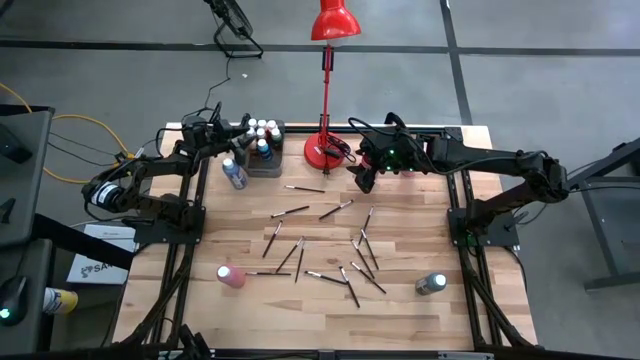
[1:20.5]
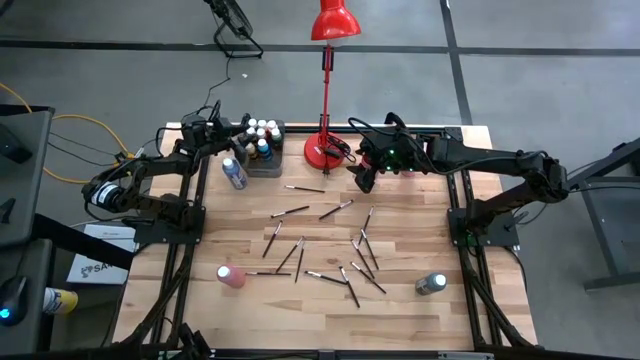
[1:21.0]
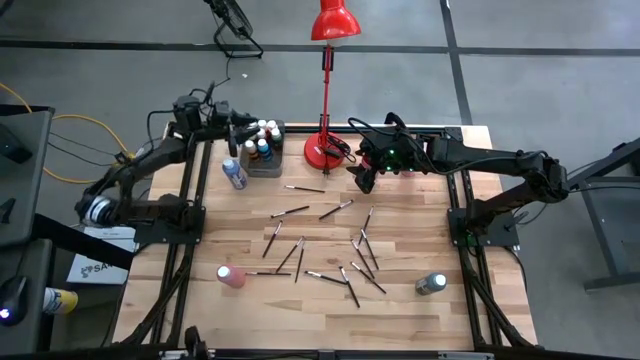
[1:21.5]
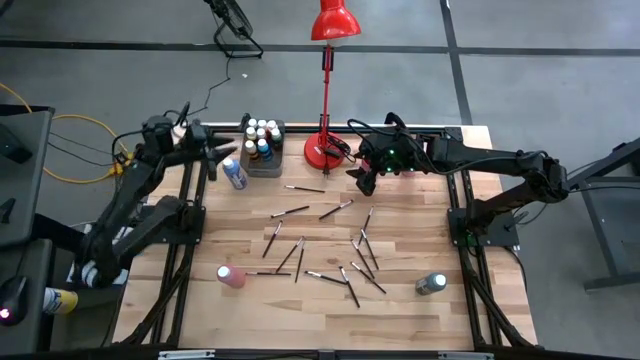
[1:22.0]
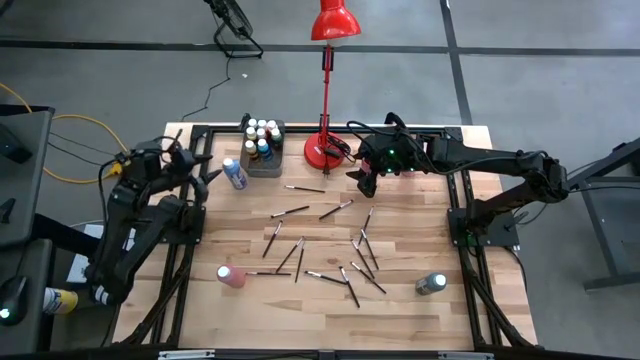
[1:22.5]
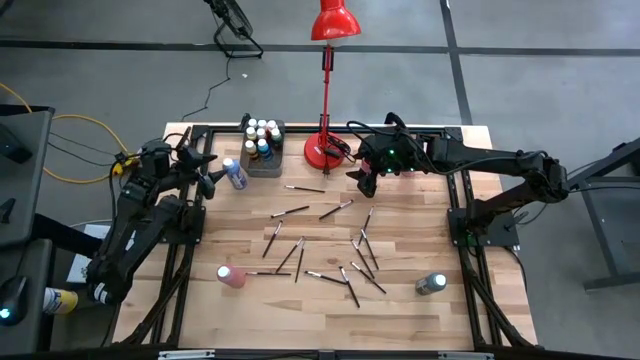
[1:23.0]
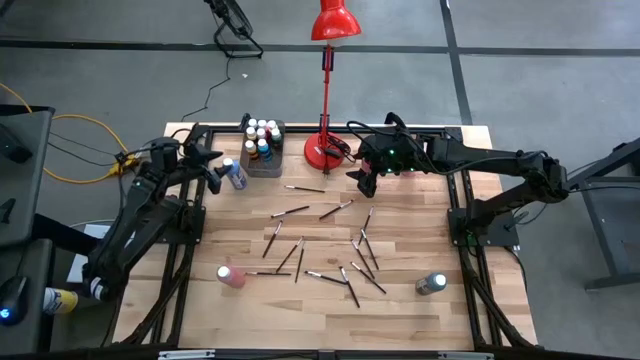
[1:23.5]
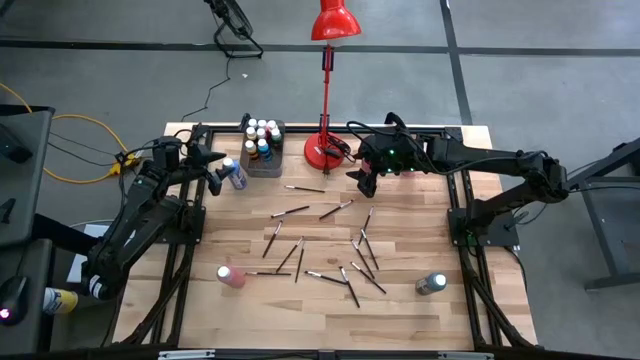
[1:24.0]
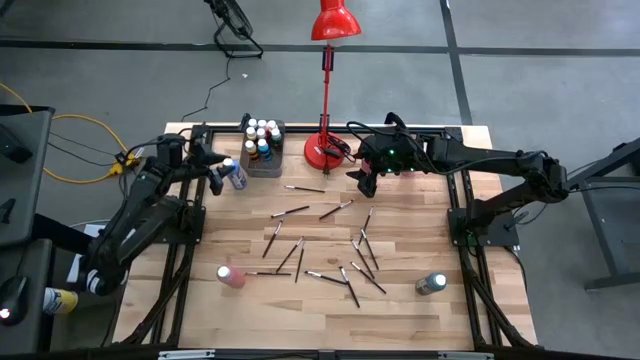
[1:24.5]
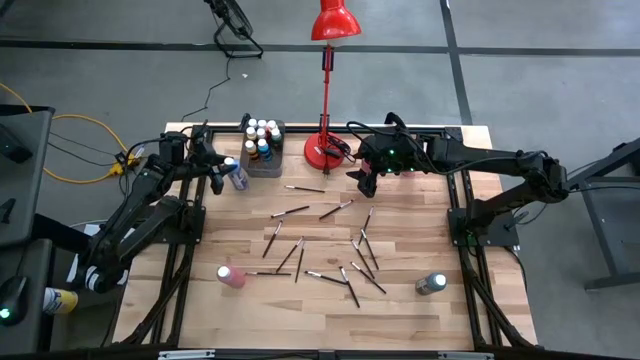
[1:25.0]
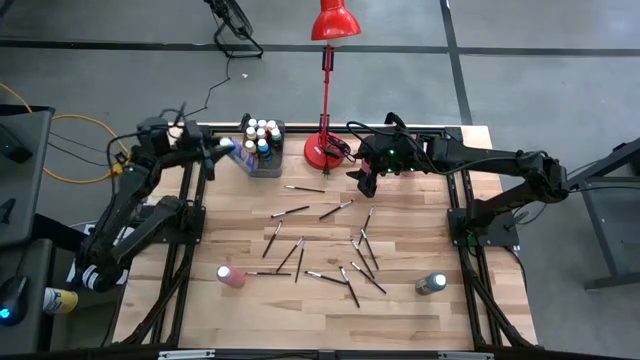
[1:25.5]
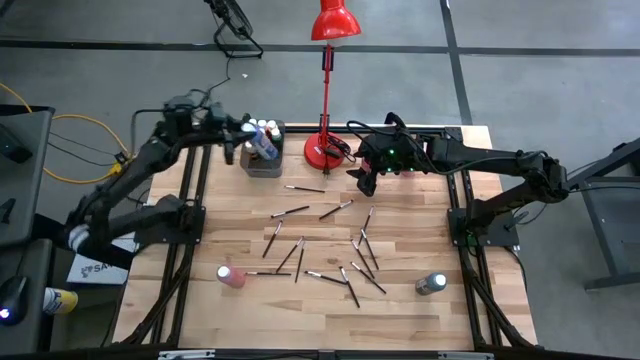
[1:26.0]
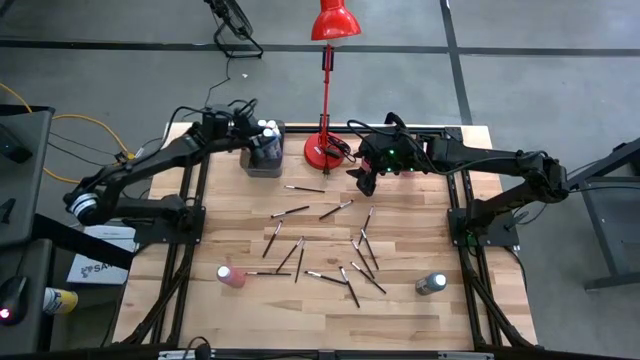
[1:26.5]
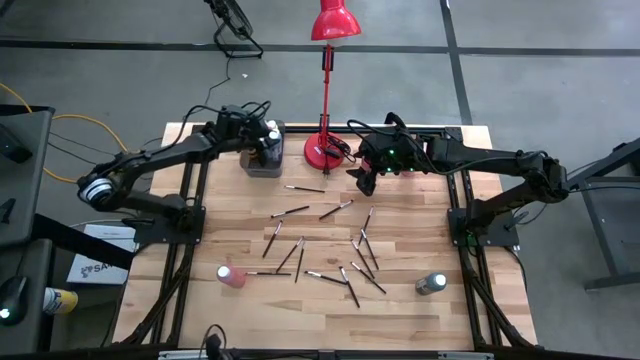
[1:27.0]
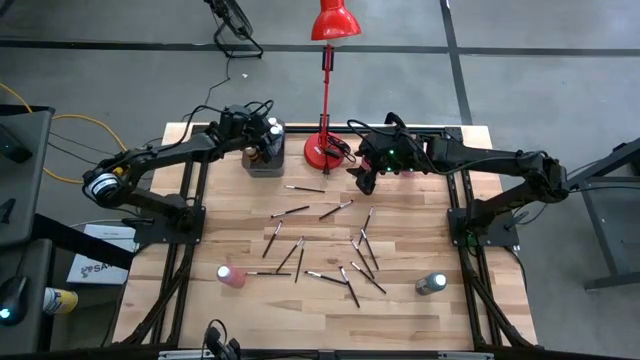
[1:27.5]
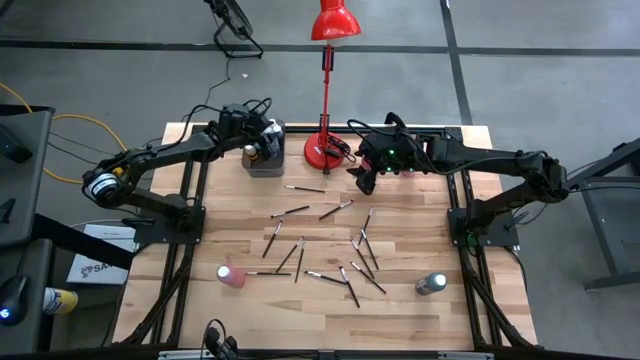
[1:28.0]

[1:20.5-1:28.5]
Task: Pick & Place Paint Supplies
Put the large blue paint bottle into the bin

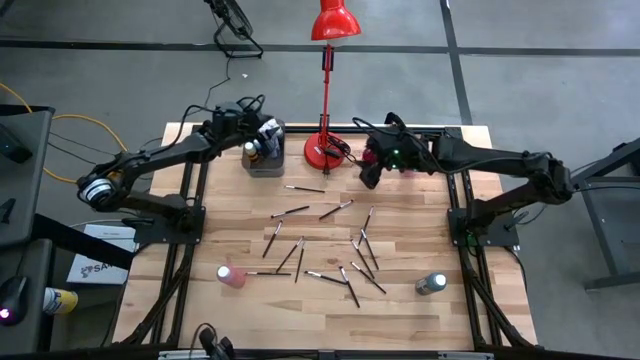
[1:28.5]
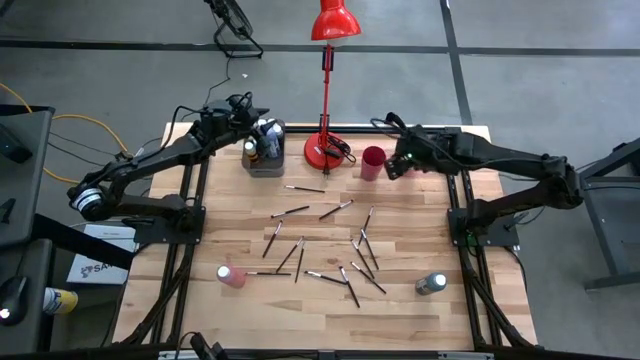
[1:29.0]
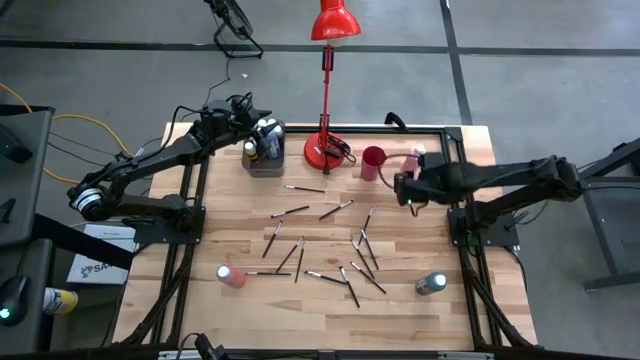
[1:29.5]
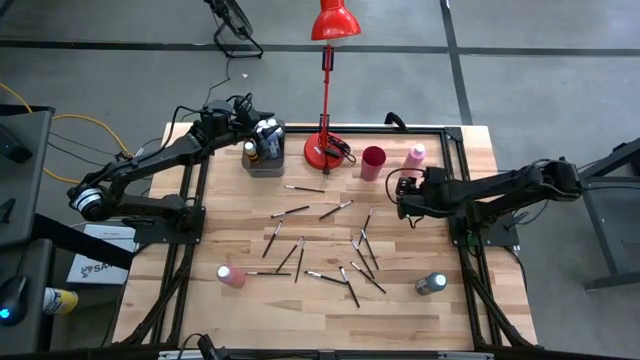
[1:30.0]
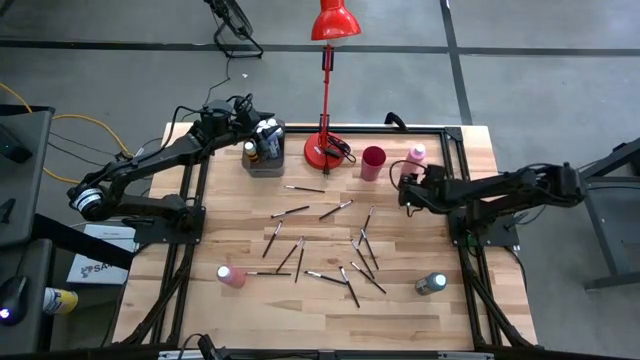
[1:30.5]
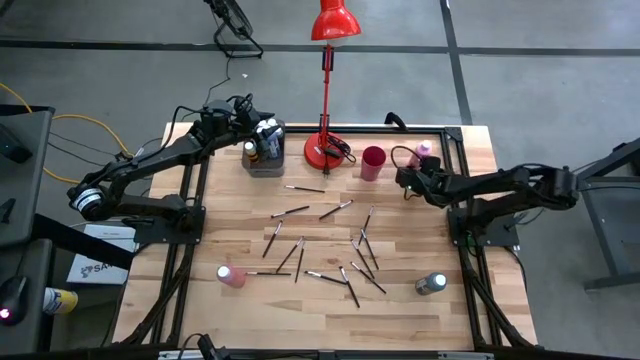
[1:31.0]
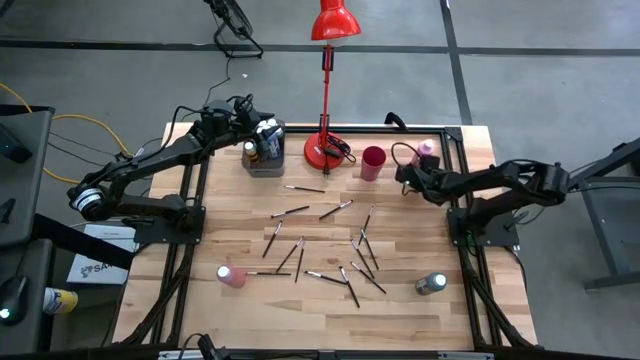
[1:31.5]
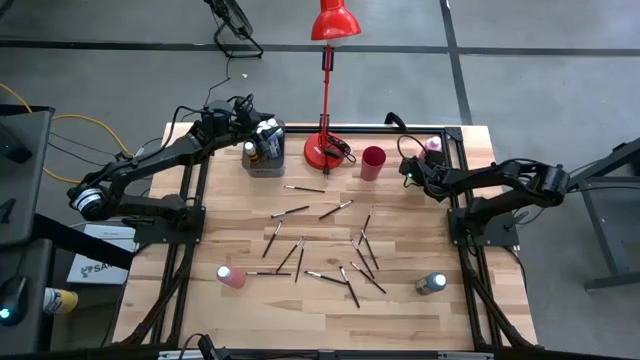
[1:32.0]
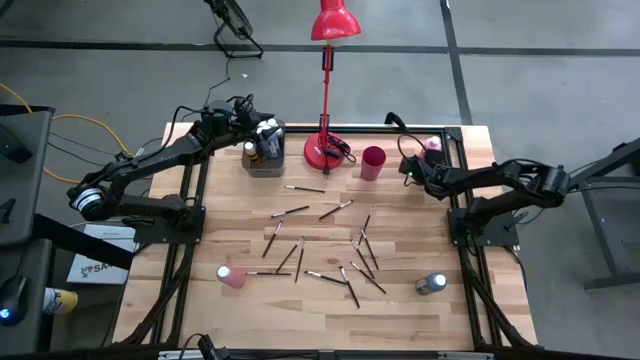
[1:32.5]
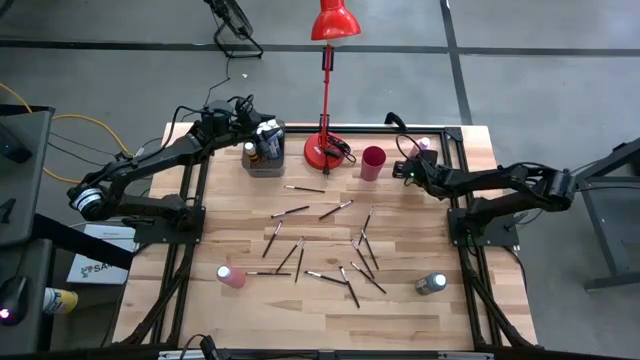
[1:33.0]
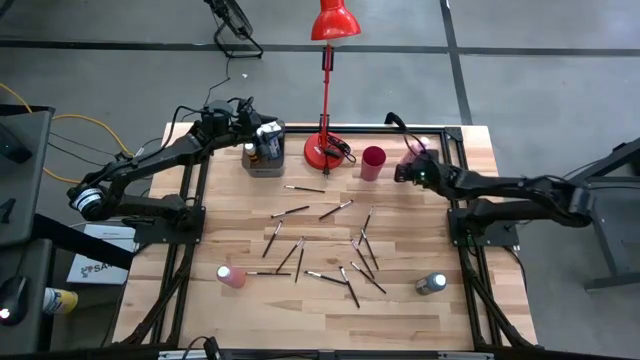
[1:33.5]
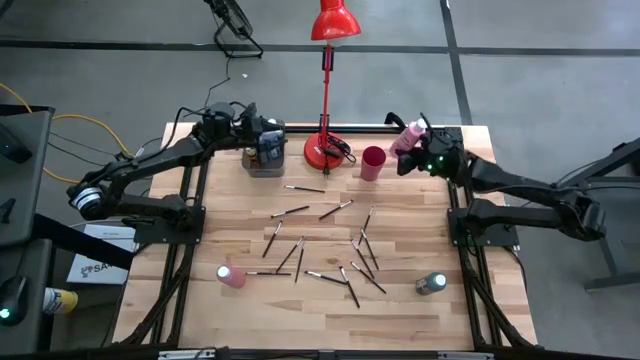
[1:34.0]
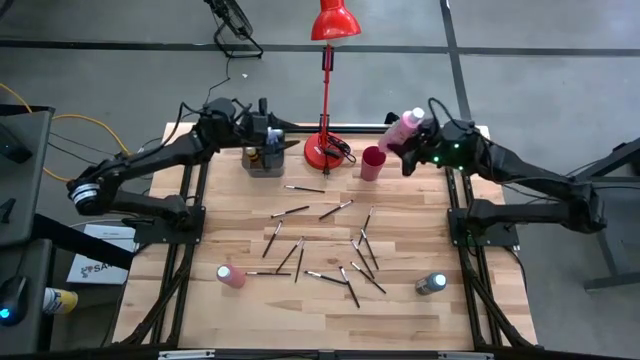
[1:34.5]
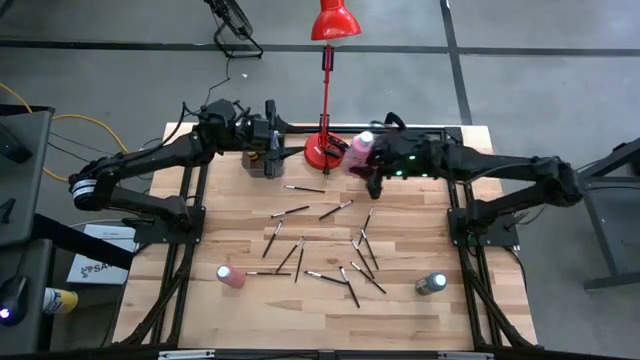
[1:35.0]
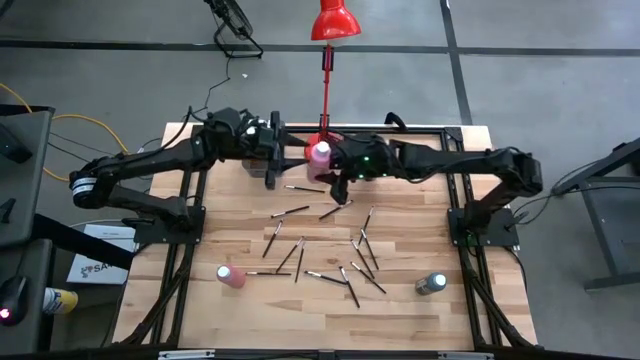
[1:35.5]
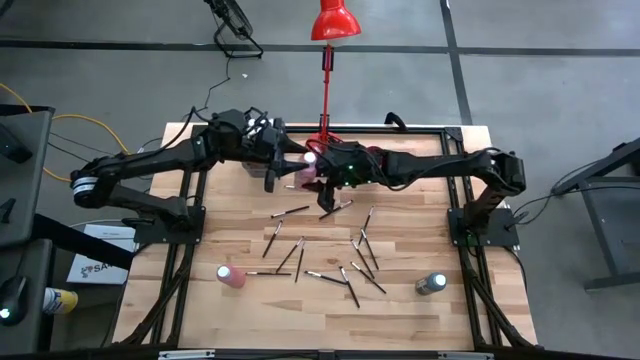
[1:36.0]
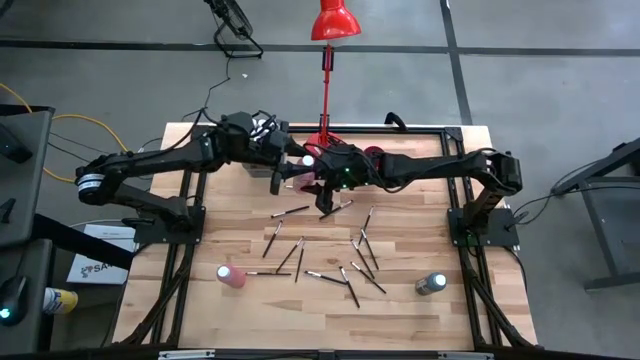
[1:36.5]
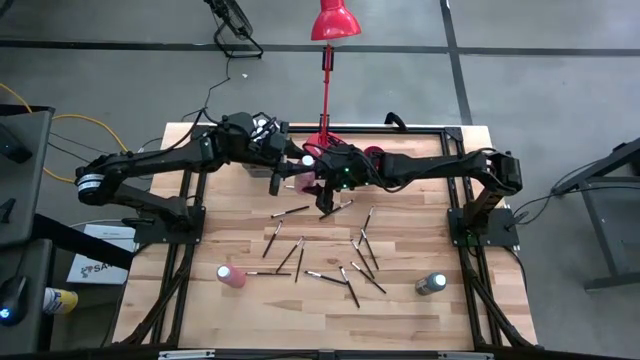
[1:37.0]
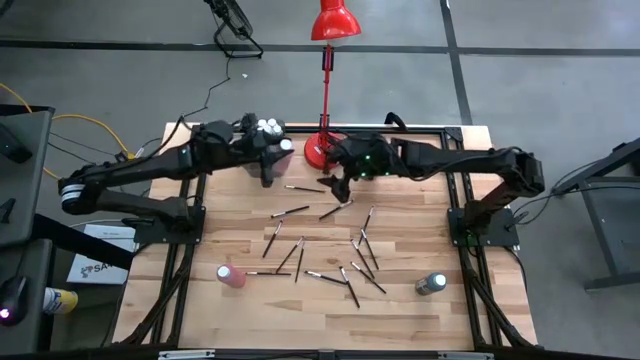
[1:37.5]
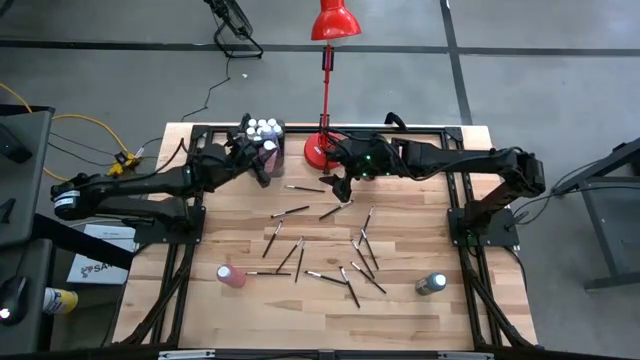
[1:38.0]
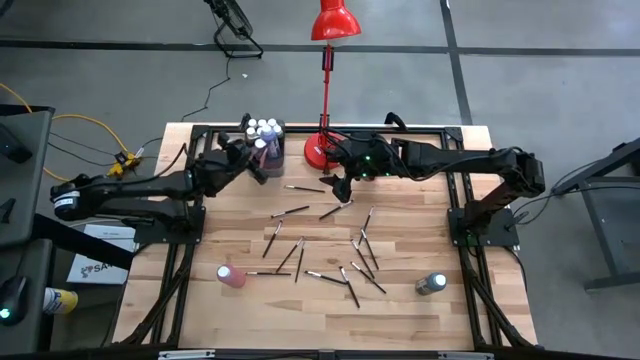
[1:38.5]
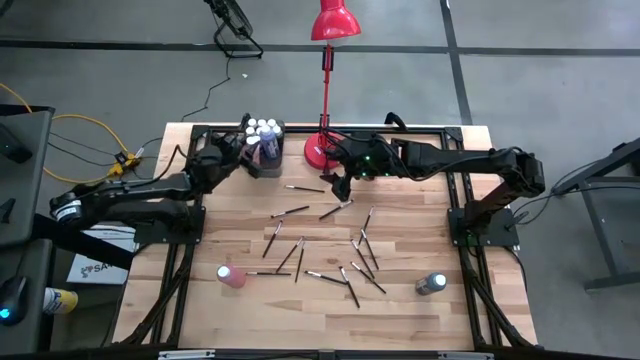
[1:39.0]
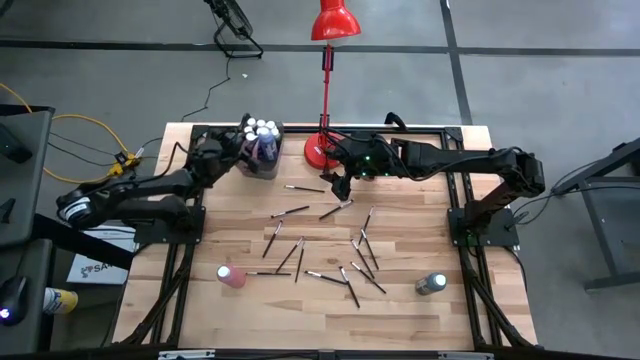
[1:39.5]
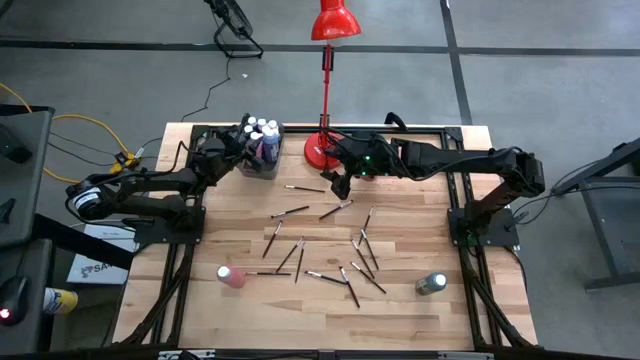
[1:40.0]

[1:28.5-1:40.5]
Put the large light pink paint bottle into the bin

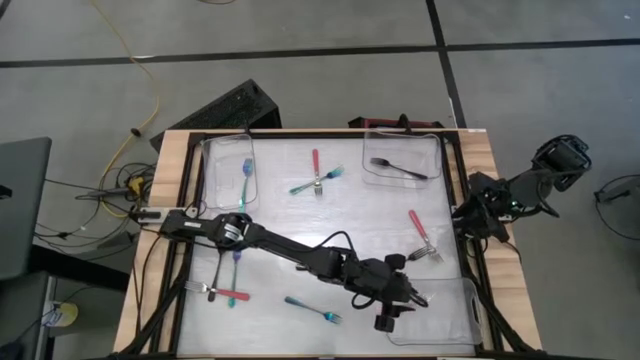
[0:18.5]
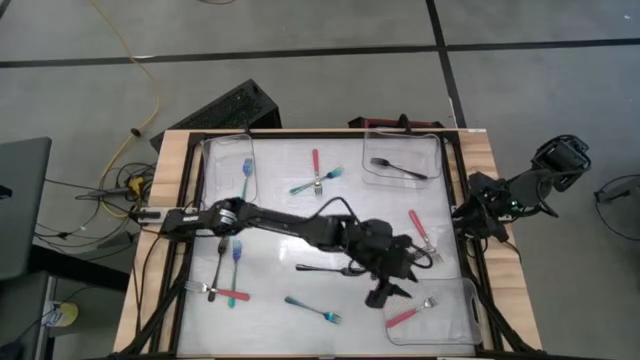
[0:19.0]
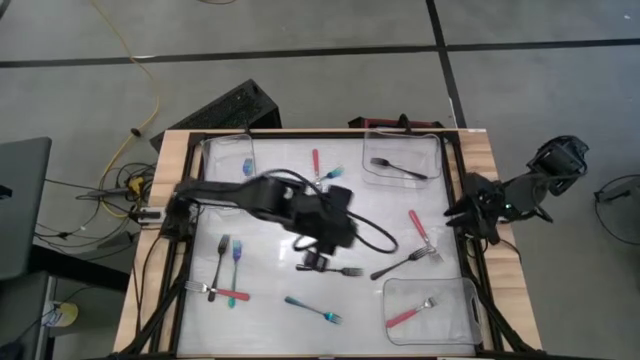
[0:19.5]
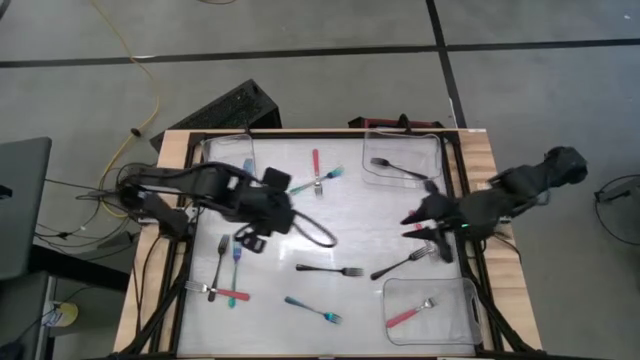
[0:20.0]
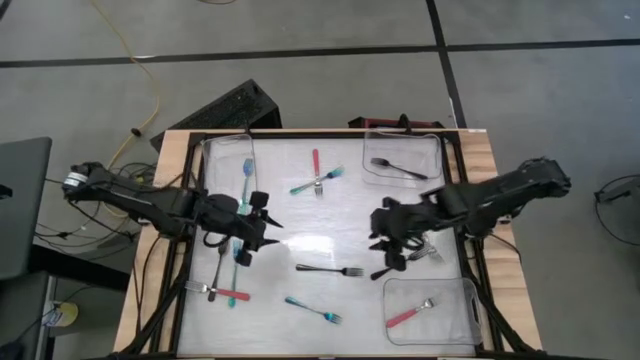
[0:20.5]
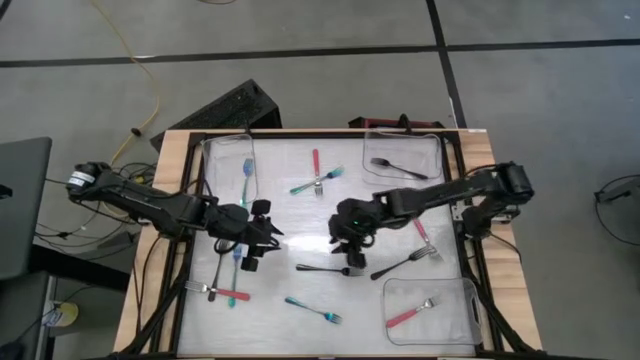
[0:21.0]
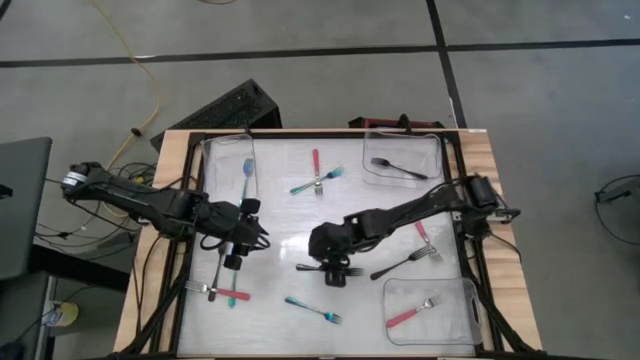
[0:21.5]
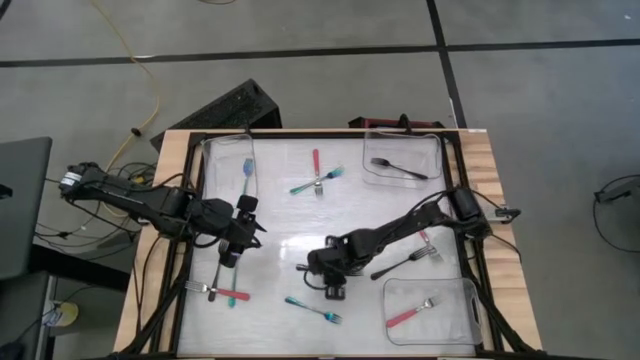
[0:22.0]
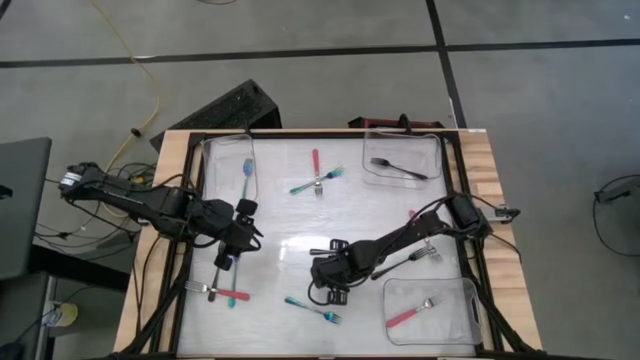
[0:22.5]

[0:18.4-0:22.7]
Task: Sort silverware by color (type)
Put the black fork into the top right transparent bin
